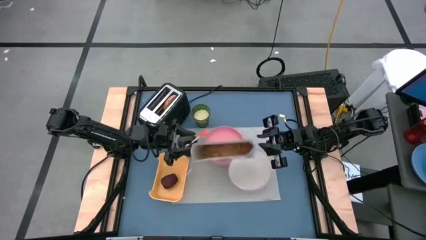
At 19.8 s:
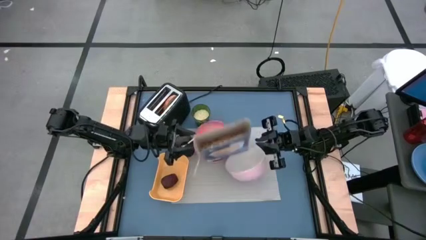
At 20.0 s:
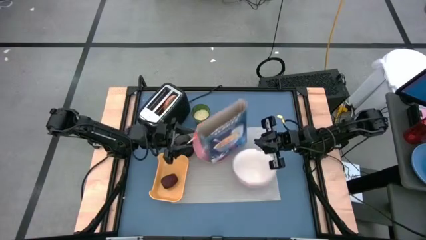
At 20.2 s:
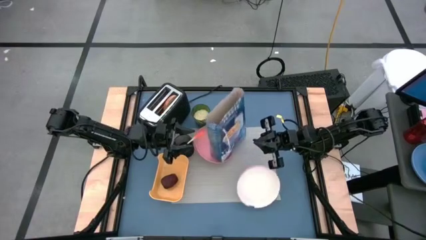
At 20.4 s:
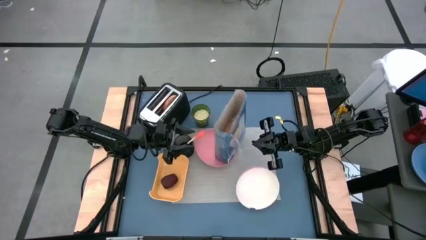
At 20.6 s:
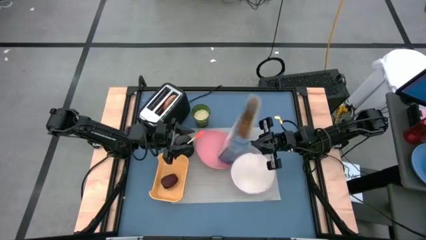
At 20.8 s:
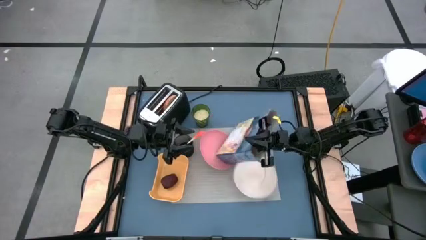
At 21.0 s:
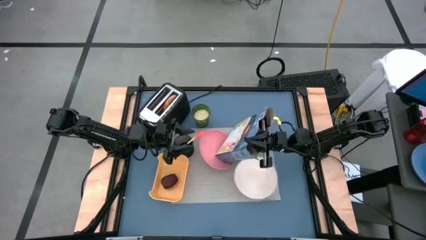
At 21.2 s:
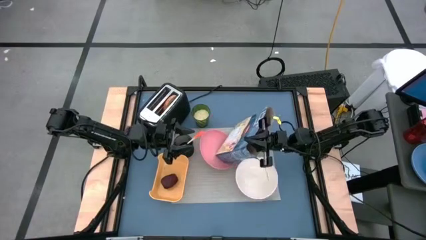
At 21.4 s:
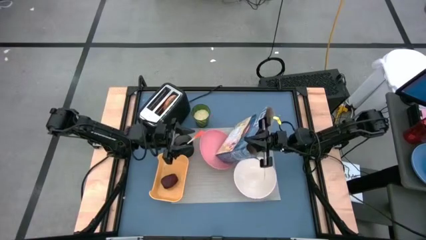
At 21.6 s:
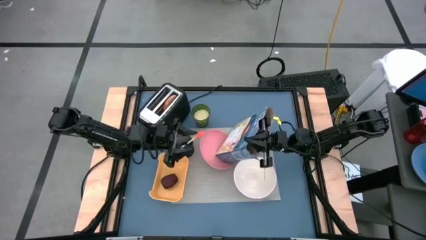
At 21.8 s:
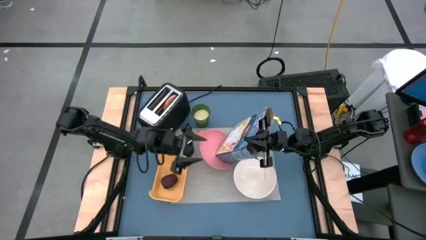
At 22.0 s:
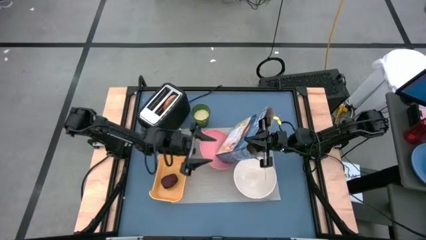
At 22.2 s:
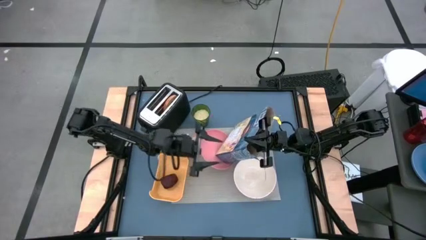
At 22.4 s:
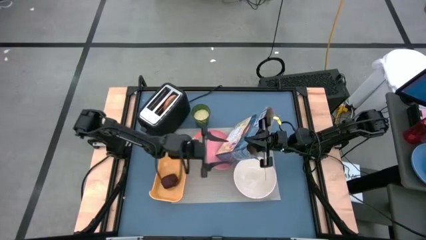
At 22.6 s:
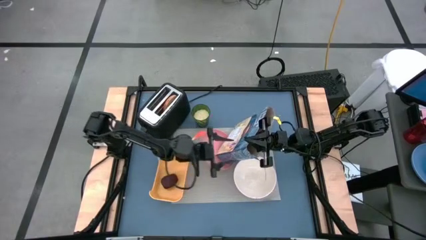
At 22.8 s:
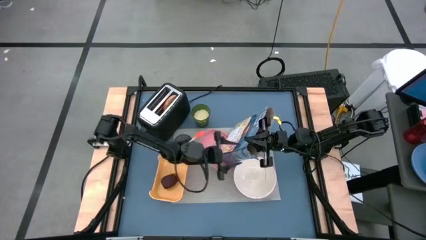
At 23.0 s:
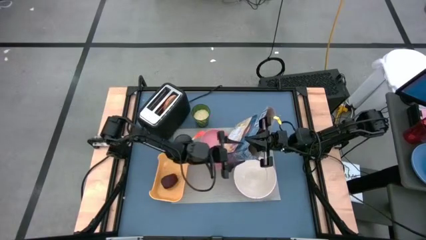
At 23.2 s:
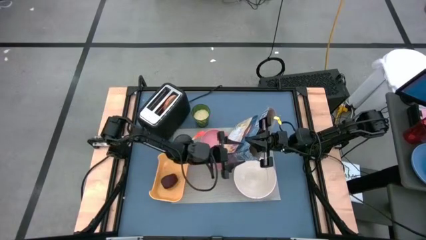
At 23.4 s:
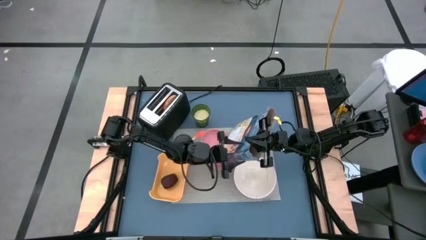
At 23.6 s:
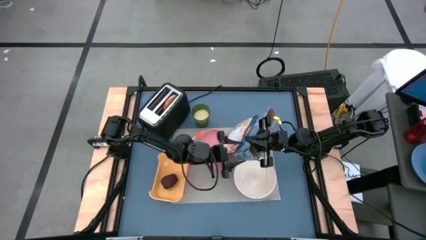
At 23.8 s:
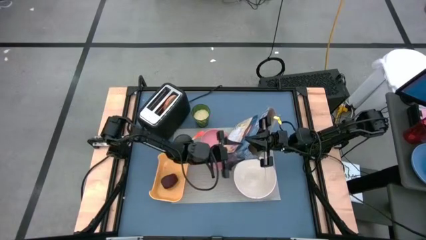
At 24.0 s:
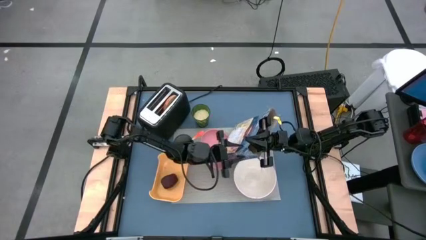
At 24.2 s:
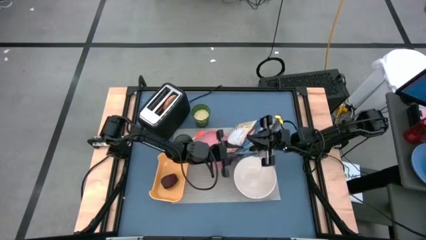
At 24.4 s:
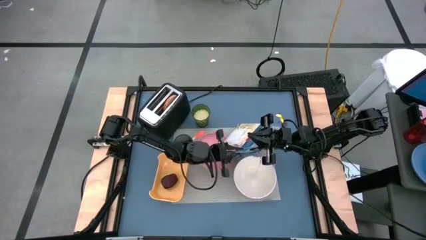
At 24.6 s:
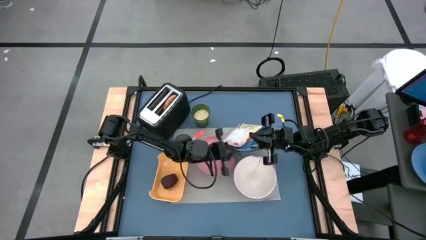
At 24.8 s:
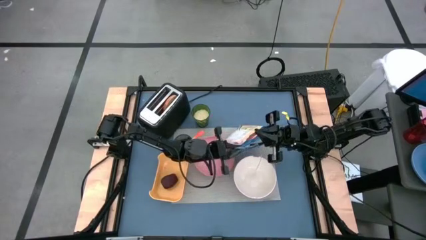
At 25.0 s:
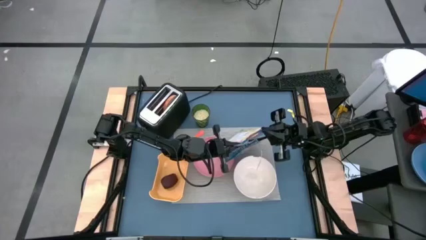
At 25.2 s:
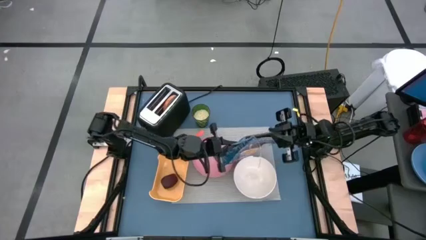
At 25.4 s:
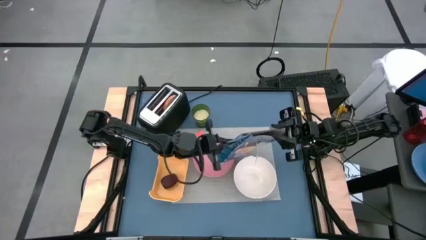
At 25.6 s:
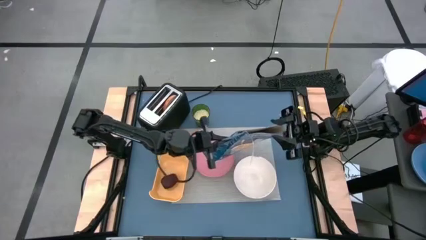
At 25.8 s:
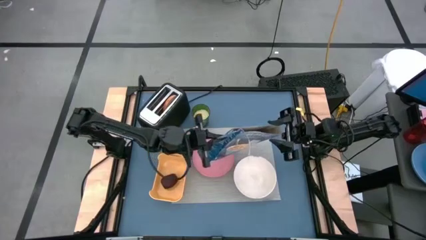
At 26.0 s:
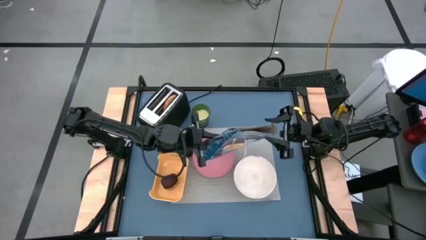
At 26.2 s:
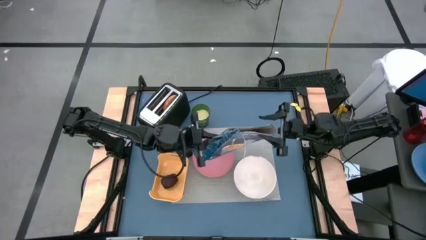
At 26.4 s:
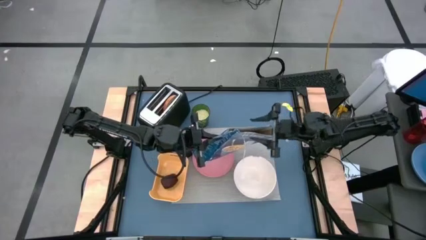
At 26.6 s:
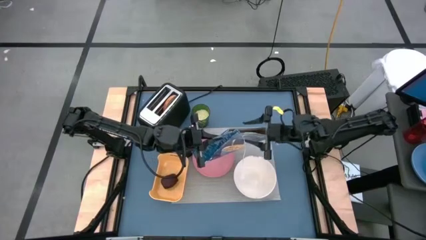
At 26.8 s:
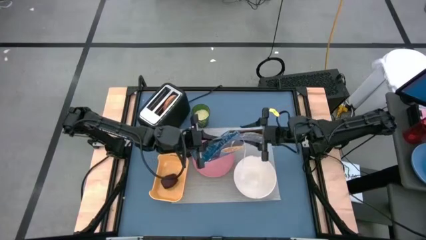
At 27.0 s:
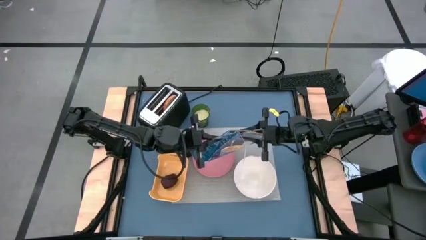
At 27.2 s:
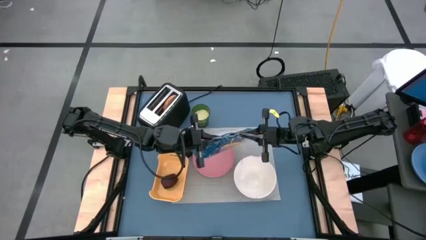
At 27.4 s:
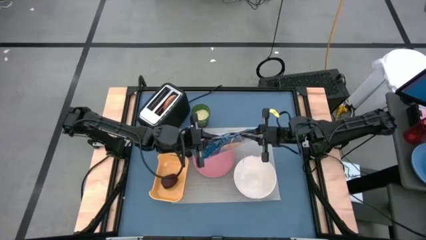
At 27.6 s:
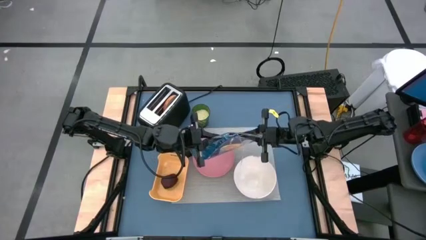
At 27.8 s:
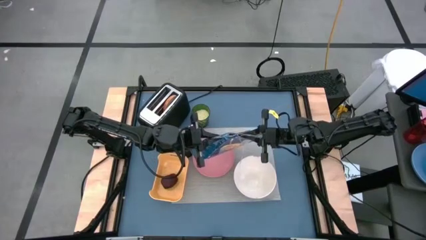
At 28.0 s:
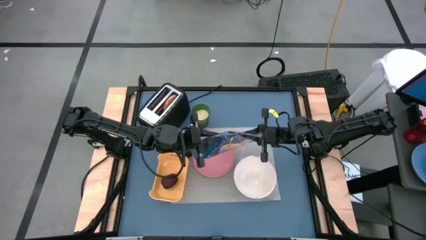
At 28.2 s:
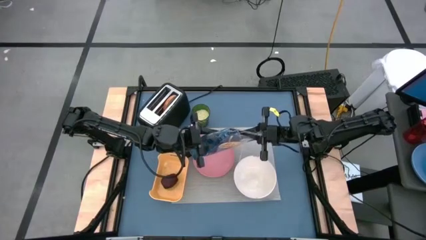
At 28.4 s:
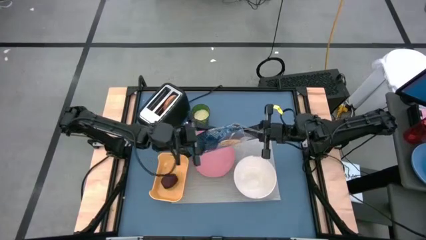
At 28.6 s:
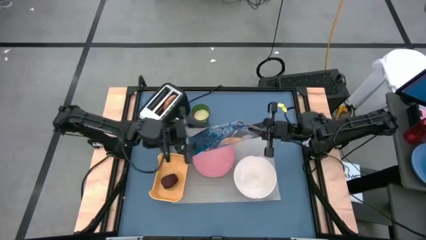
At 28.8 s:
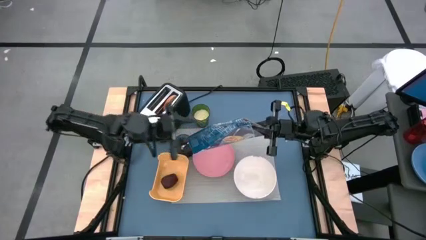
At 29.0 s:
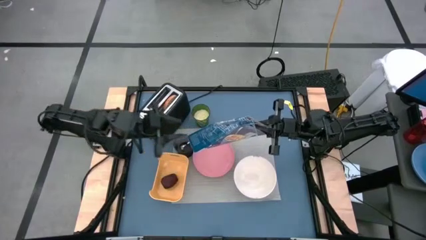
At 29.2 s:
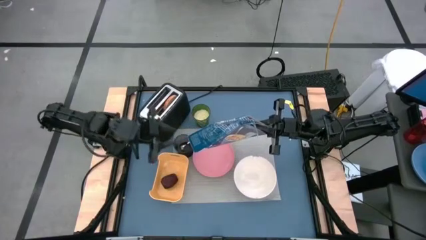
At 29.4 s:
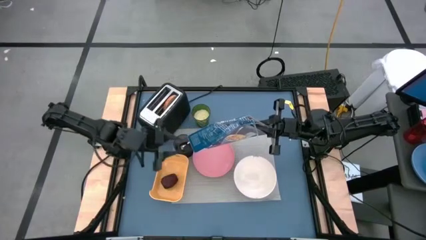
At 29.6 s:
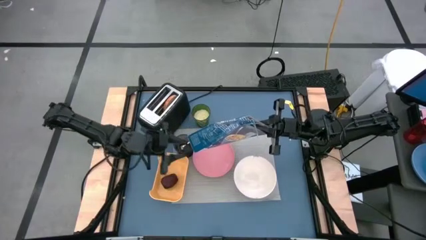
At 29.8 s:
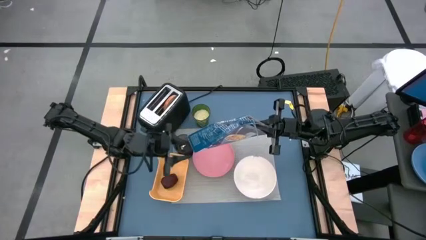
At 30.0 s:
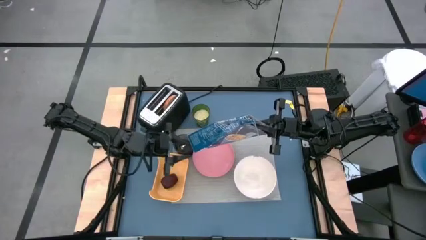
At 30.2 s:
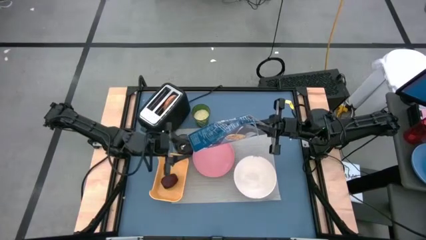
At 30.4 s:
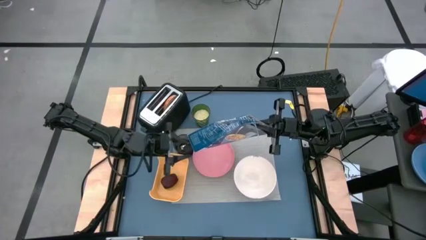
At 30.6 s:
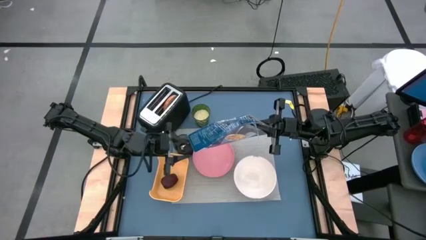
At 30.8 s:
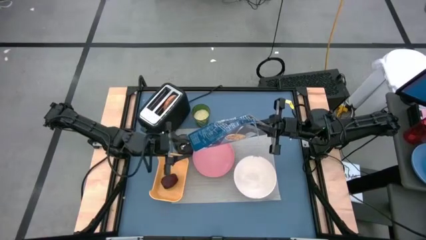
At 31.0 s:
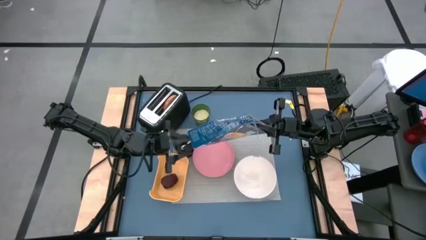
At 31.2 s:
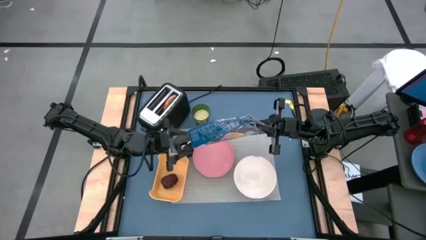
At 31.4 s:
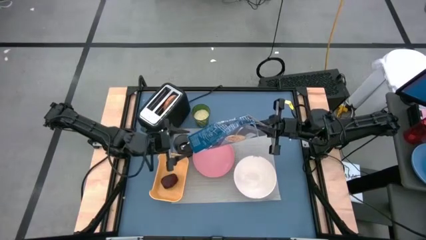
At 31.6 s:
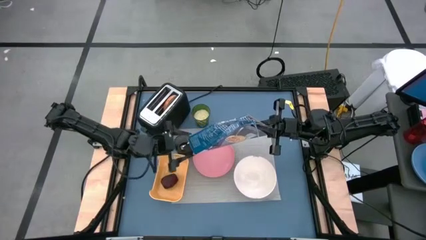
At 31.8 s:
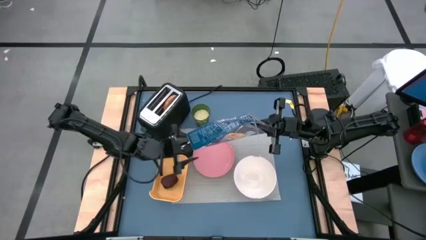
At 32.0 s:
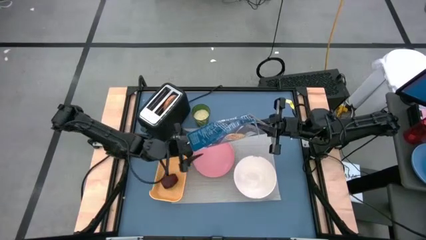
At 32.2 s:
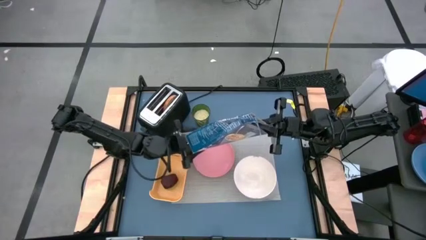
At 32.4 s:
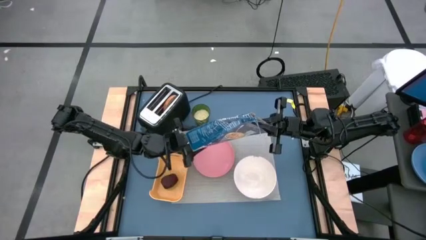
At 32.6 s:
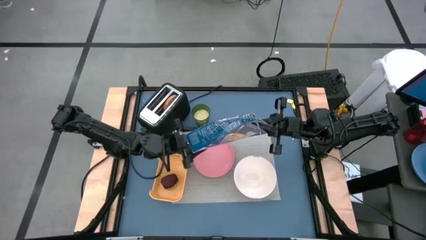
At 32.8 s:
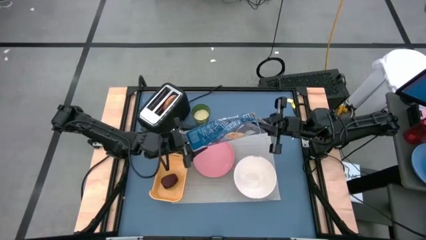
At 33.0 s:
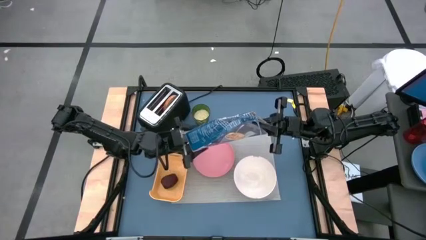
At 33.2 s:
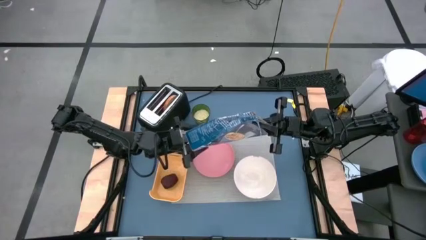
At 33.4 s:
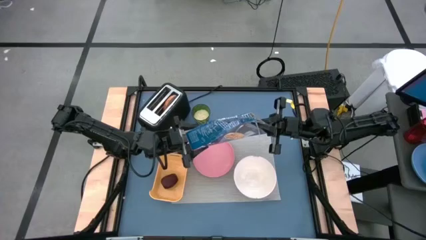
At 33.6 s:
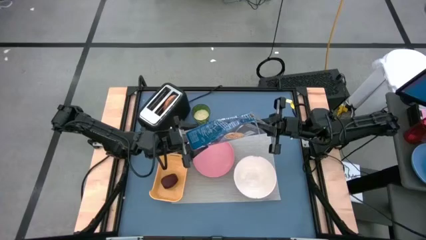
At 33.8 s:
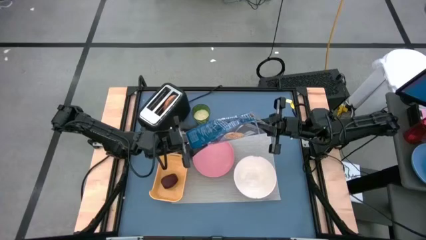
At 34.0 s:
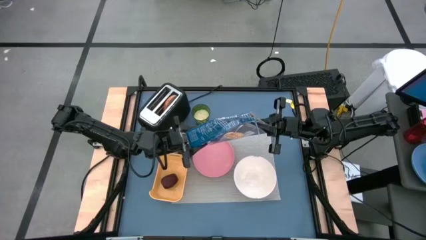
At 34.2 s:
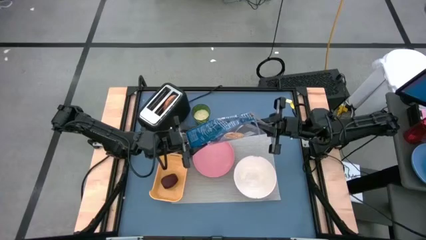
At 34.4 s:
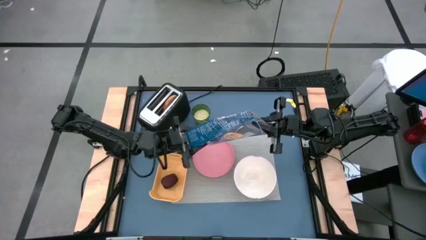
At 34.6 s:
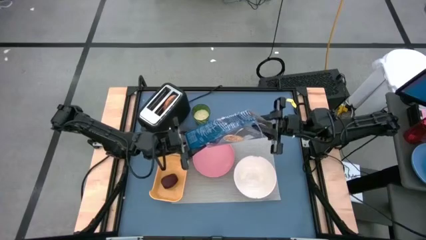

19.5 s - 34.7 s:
Task: Arrange a breakfast setting
Pour the cereal in the bowl

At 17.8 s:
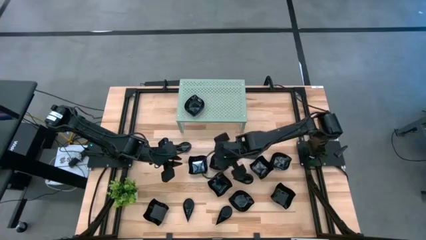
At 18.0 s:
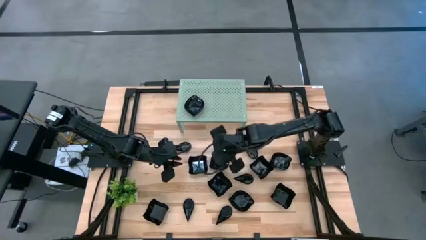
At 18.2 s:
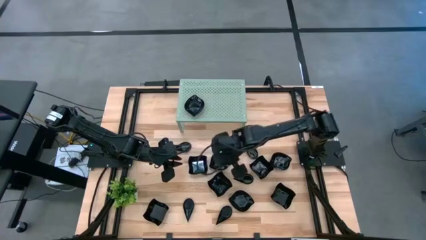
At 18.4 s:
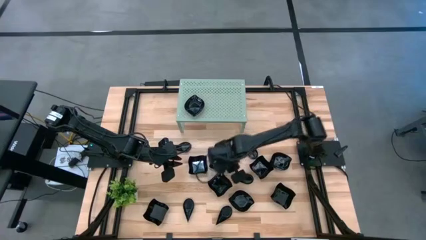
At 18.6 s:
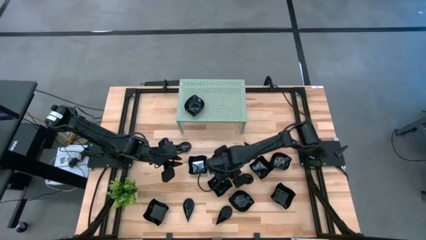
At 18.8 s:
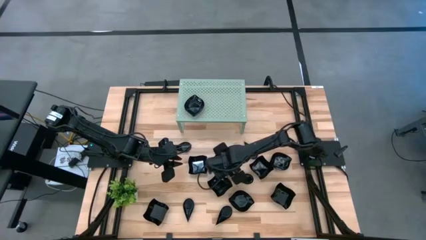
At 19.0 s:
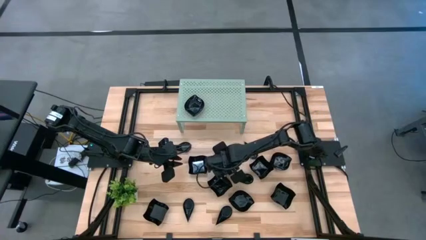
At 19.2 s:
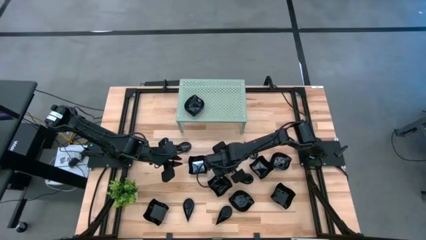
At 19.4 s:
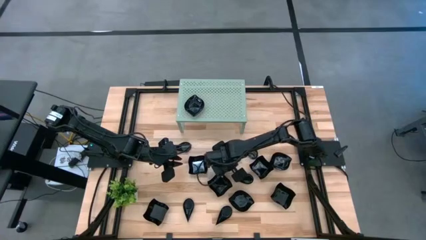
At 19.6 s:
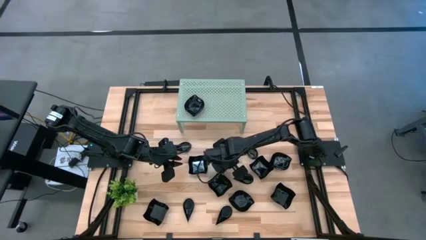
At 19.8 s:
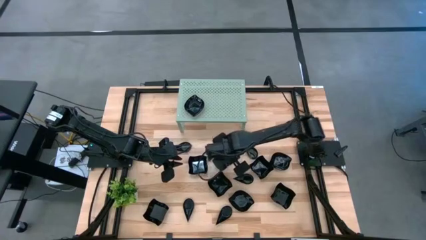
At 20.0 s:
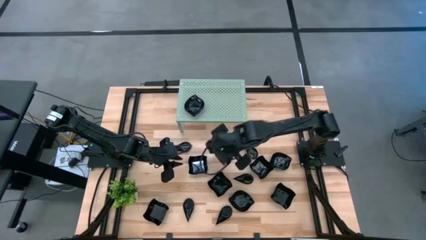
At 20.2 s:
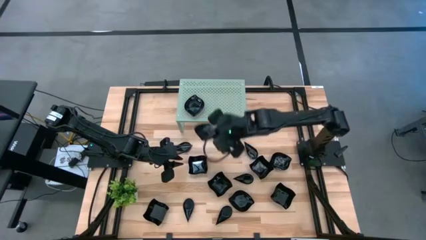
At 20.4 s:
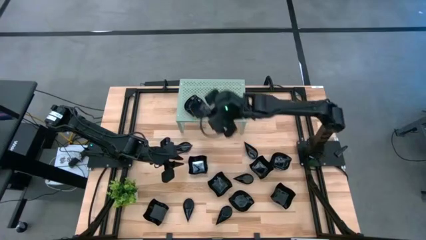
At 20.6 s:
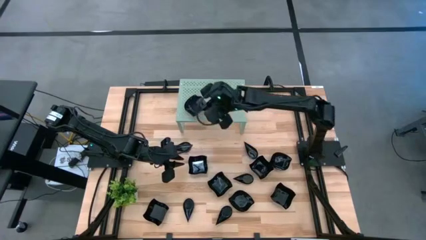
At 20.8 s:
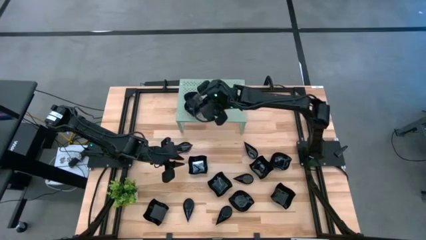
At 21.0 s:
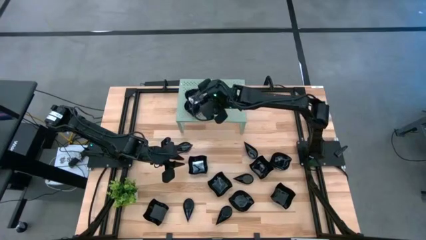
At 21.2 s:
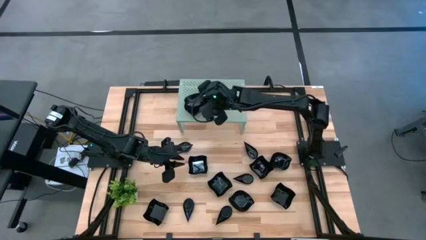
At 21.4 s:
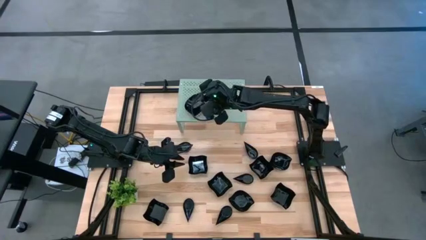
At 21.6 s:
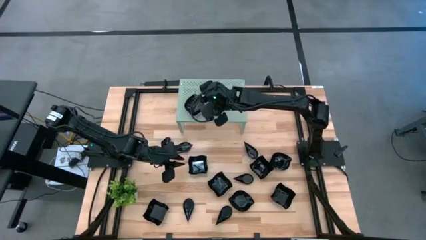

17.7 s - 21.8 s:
Task: Pick & Place Mini shaped plates
Stack the leaf-shaped plate on top of the other leaf-shaped plate on the shelf
